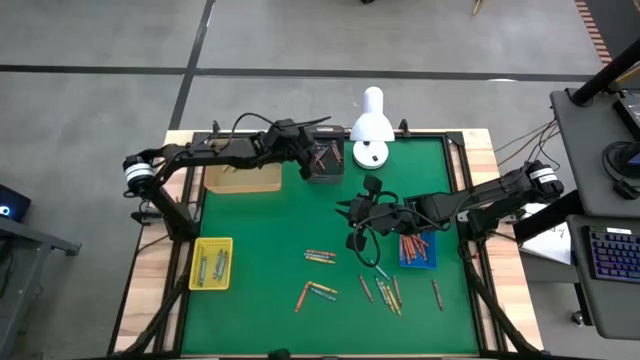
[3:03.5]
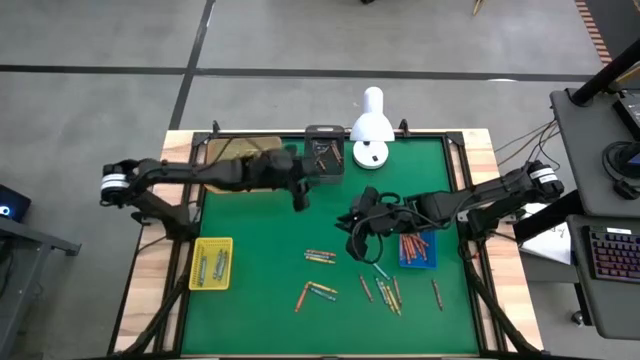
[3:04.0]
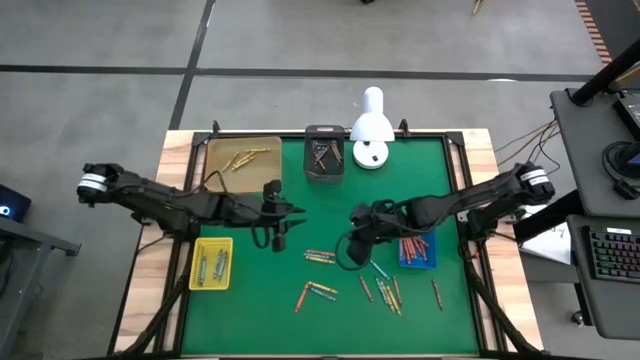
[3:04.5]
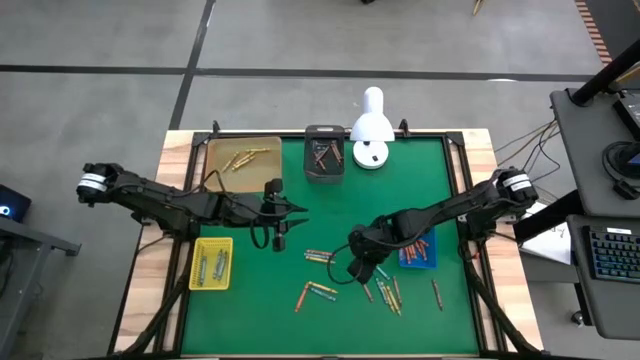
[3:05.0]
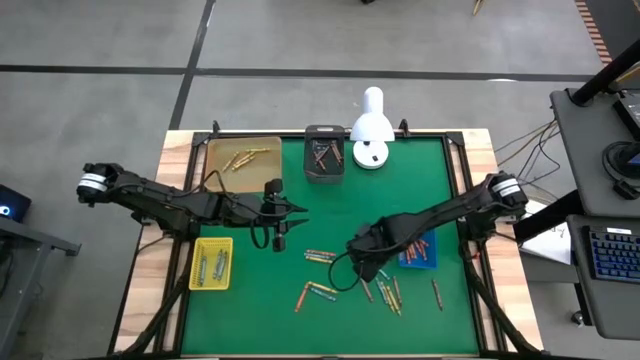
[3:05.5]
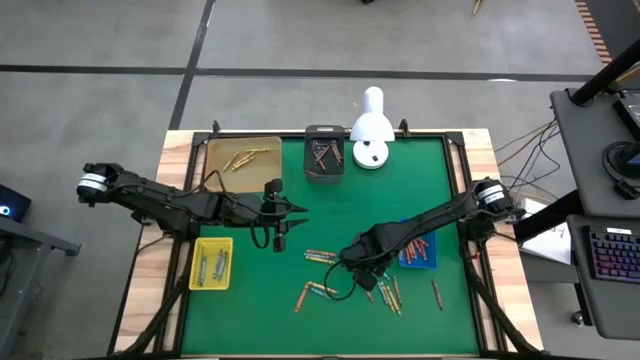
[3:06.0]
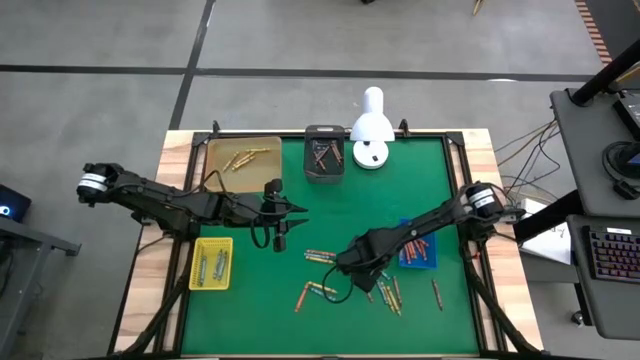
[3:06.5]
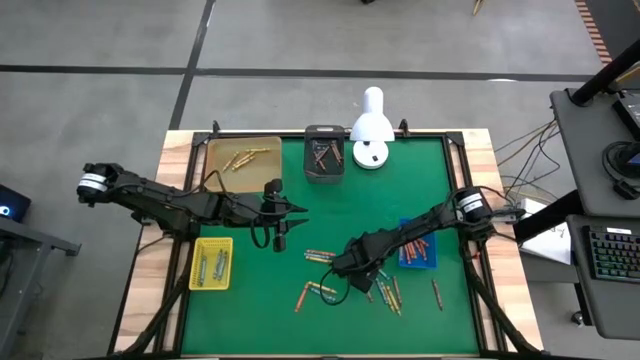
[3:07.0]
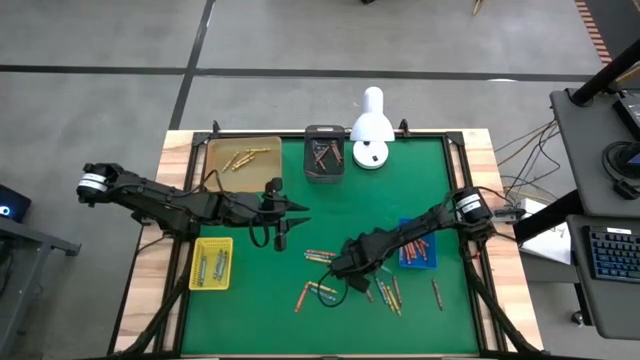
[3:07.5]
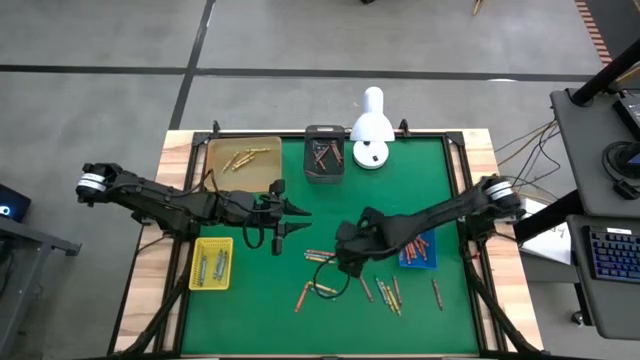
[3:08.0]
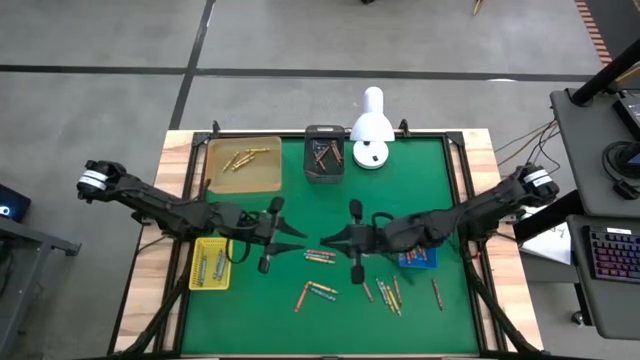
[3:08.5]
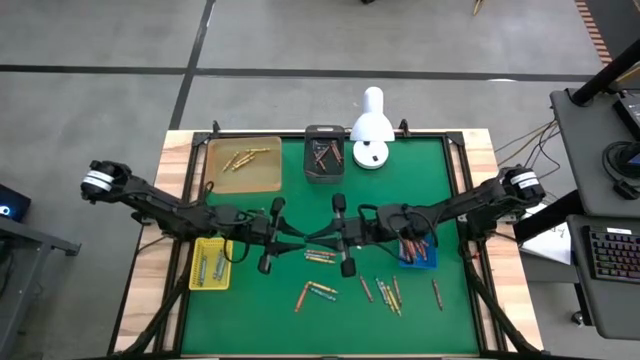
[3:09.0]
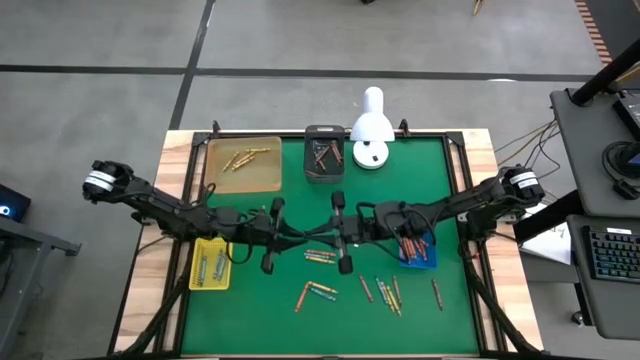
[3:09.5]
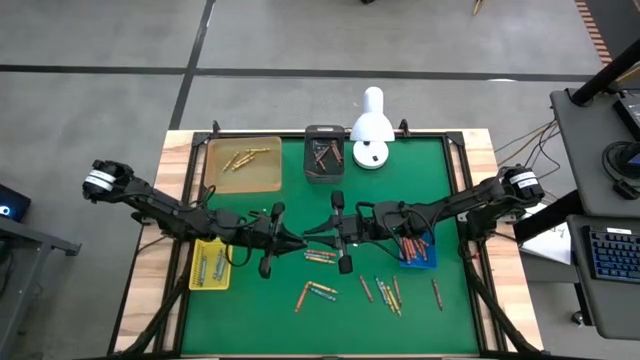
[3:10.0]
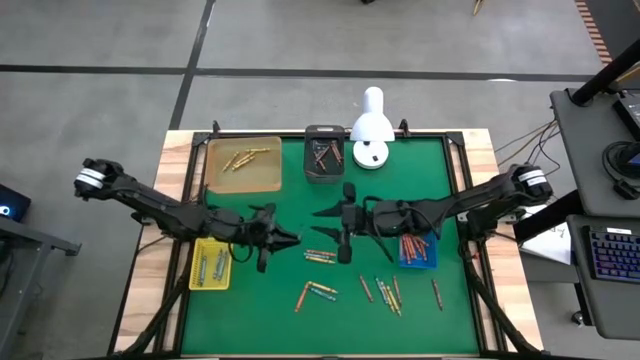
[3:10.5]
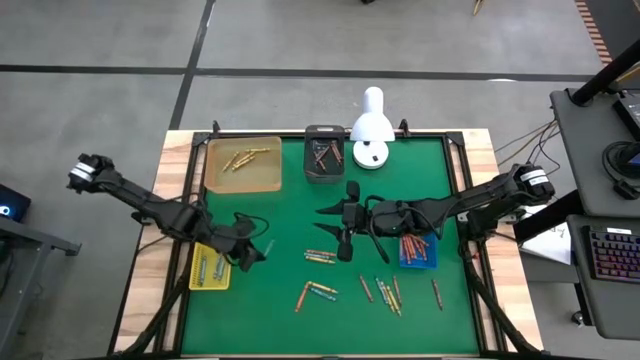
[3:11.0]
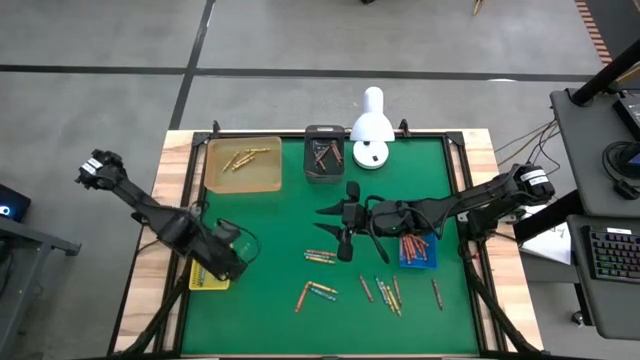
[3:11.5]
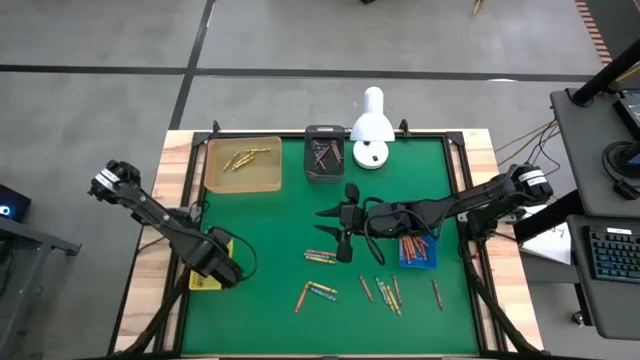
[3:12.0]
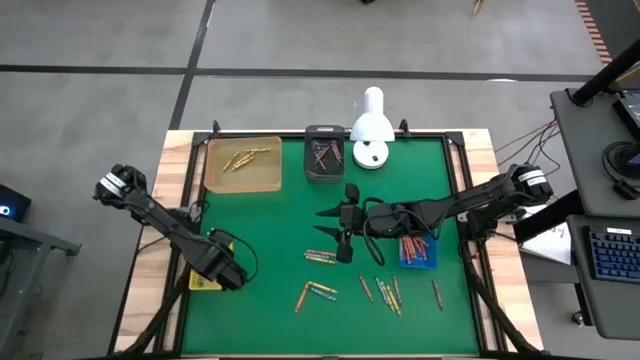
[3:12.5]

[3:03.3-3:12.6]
Task: Sort crayons
Put the blue crayon into the yellow bin

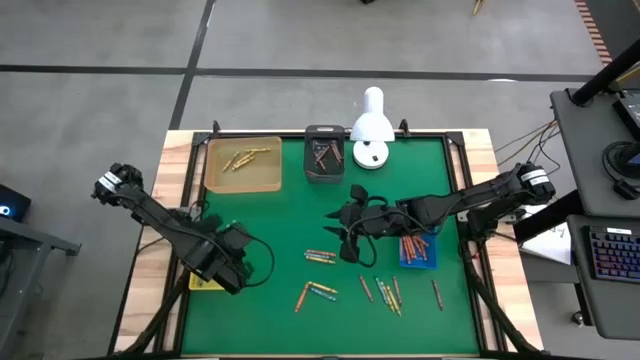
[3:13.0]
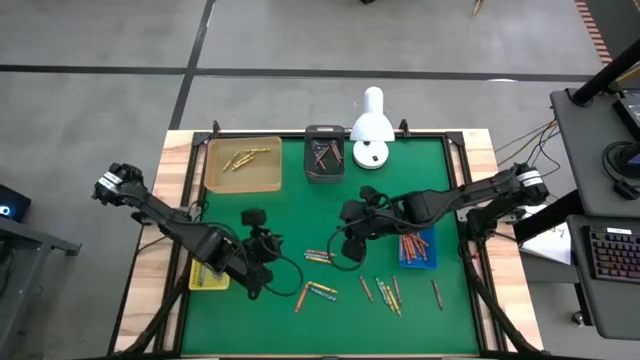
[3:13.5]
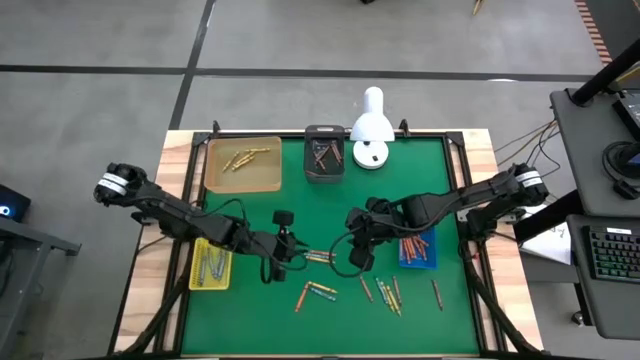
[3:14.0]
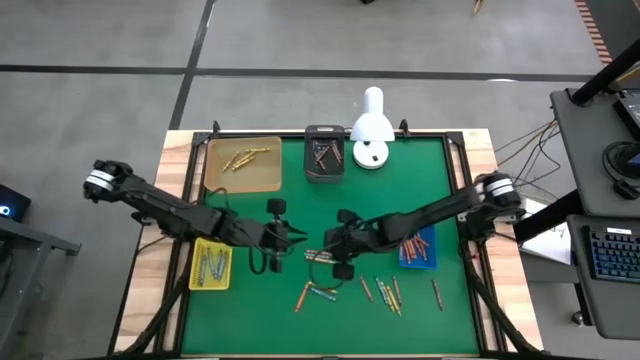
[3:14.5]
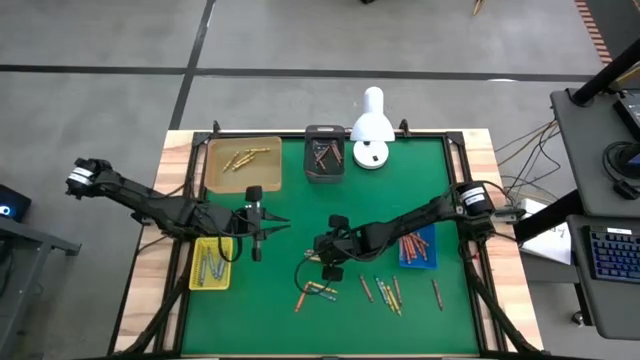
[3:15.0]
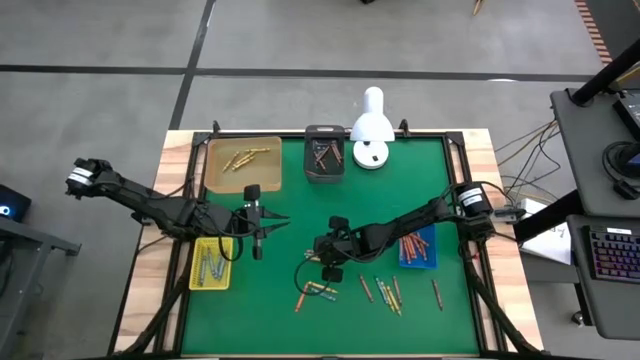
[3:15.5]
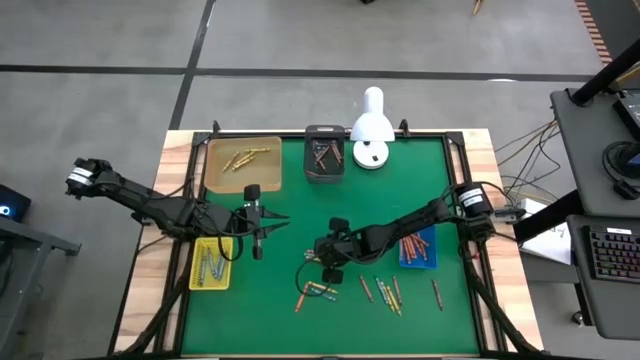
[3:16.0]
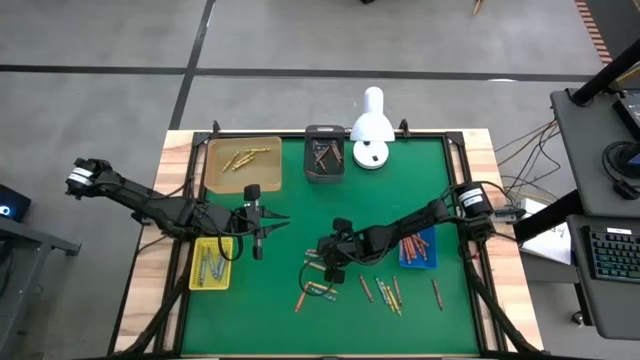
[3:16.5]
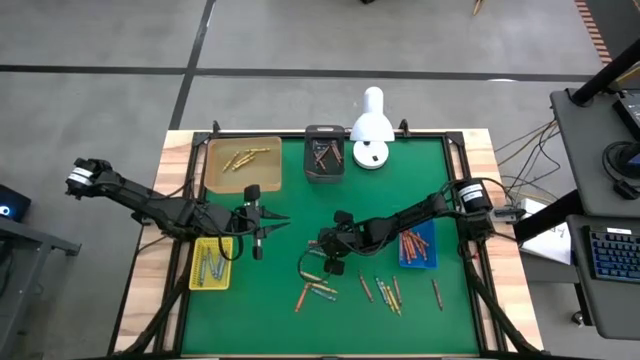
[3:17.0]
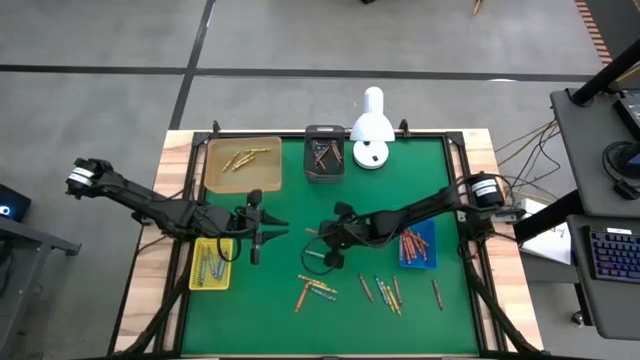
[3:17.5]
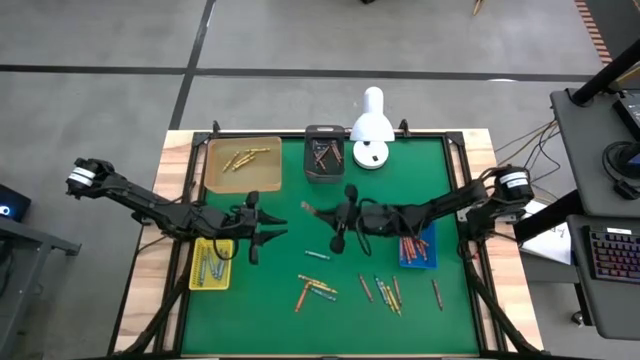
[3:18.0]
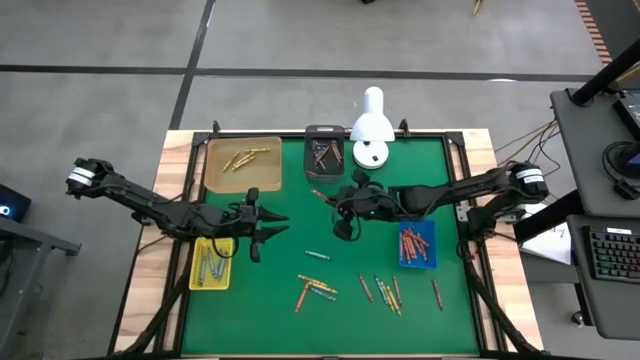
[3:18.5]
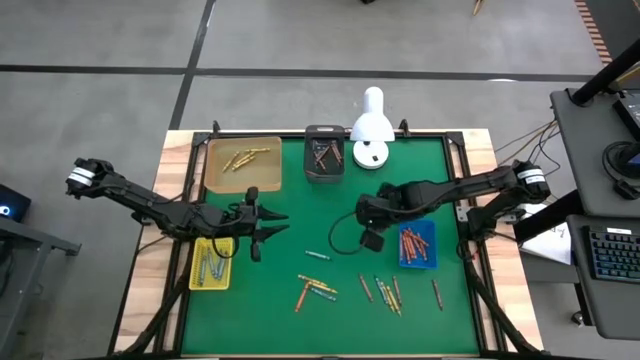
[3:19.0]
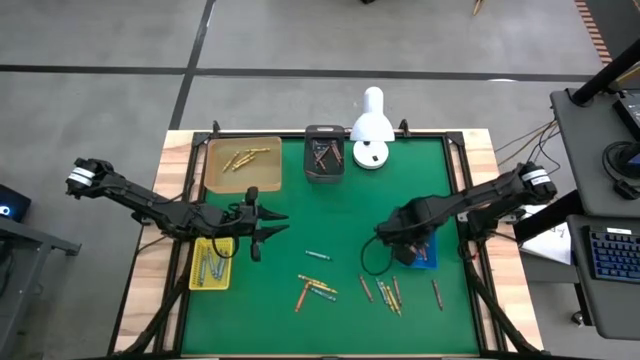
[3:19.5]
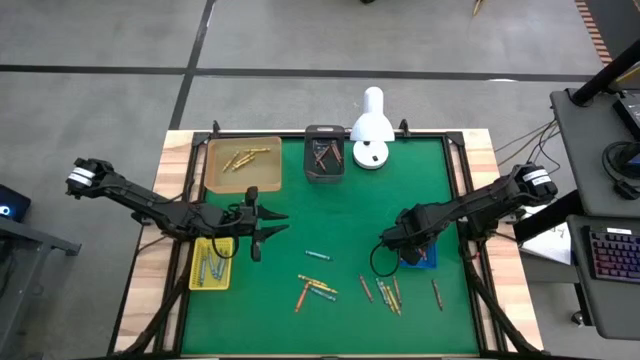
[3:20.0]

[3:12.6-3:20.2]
Put the orange crayon into the blue bin

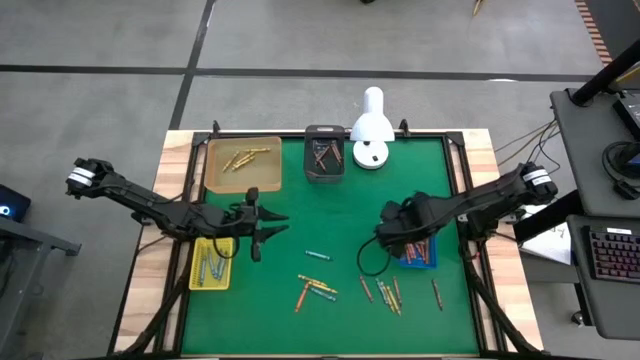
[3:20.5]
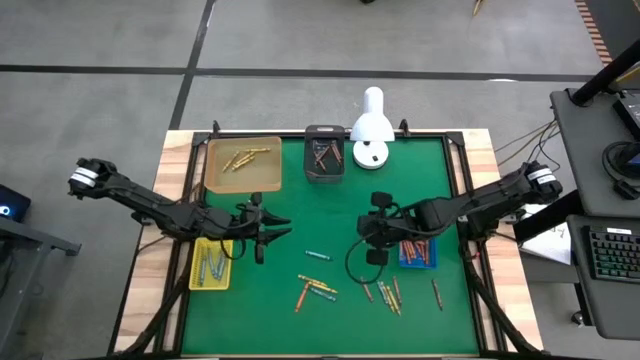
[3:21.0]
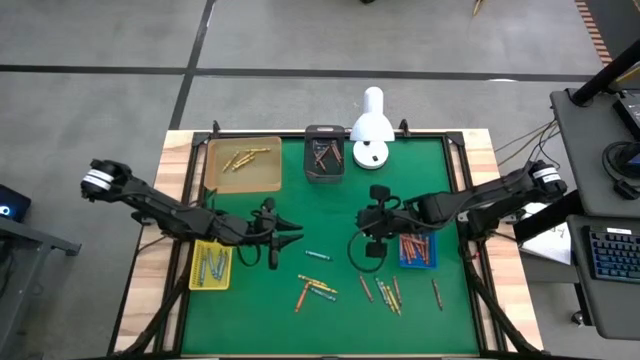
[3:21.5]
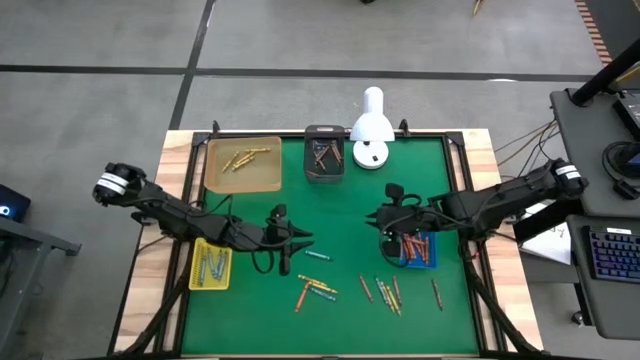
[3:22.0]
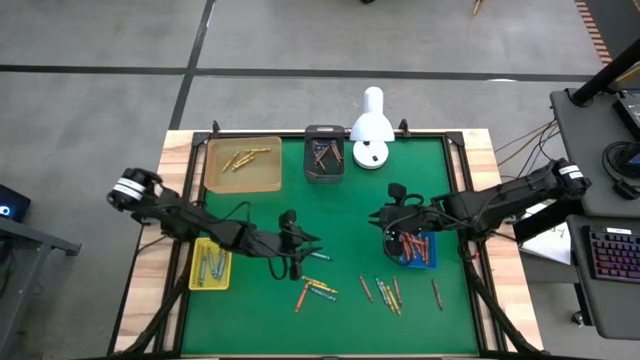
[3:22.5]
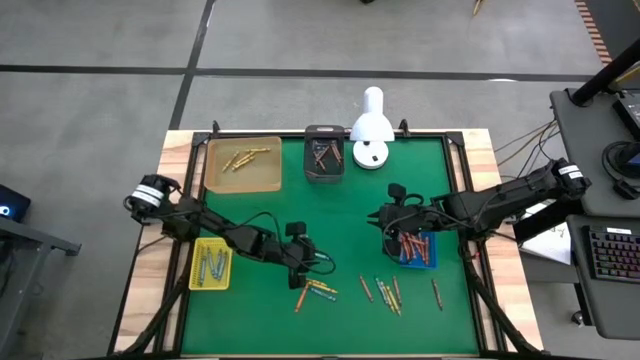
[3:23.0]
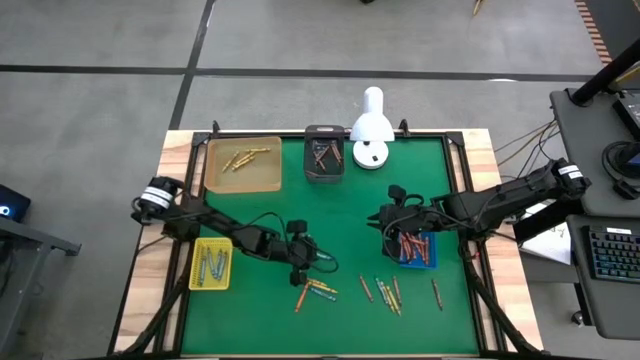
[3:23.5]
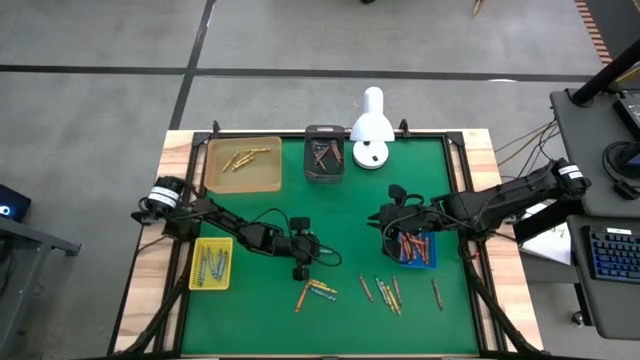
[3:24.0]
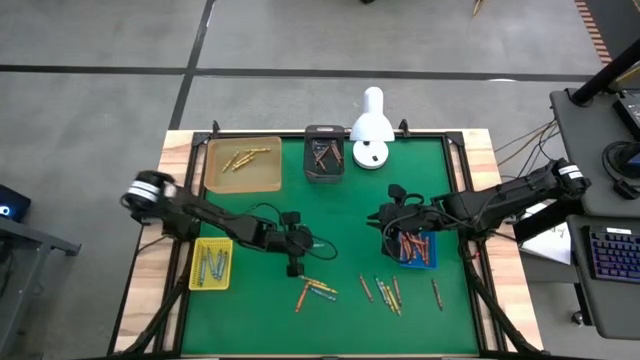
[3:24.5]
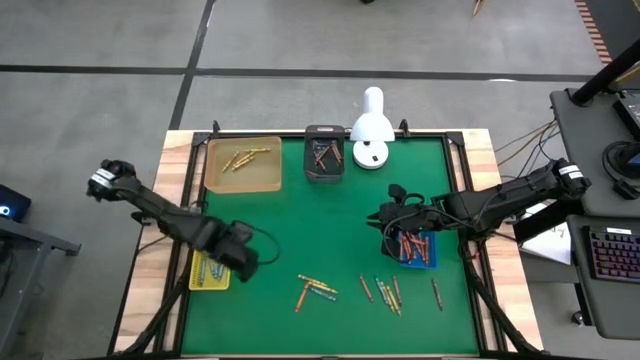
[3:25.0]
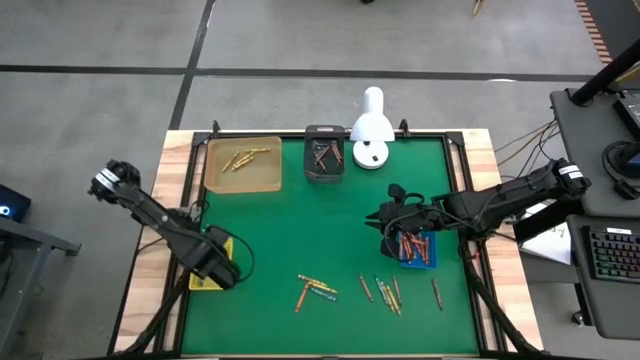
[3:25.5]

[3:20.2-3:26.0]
Put the blue crayon into the yellow bin
